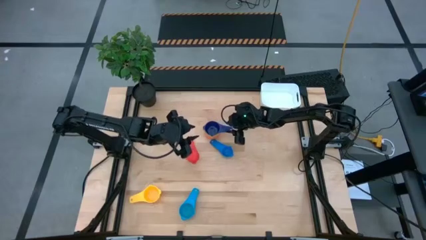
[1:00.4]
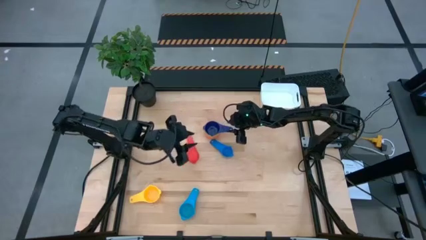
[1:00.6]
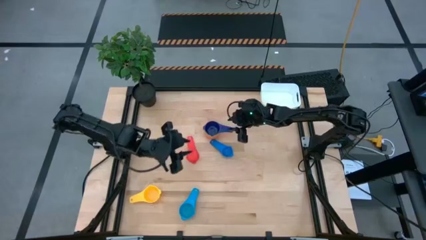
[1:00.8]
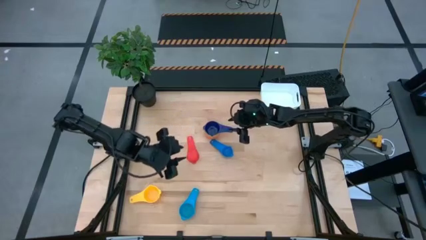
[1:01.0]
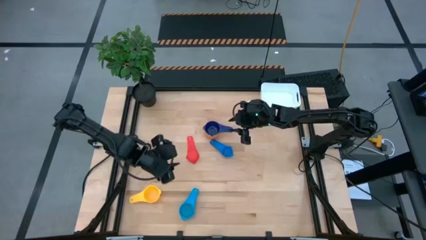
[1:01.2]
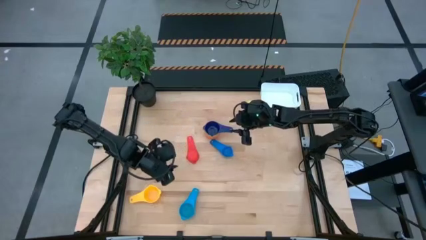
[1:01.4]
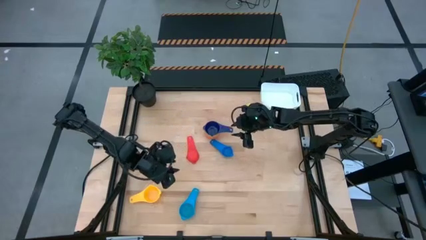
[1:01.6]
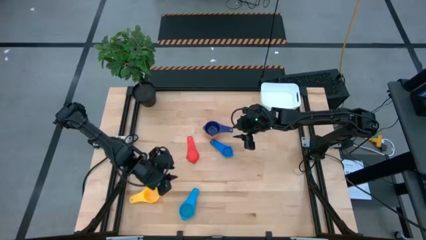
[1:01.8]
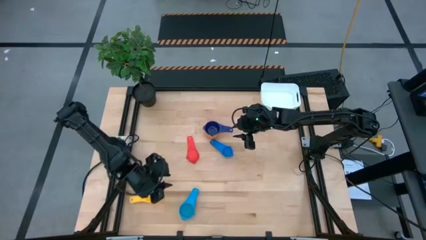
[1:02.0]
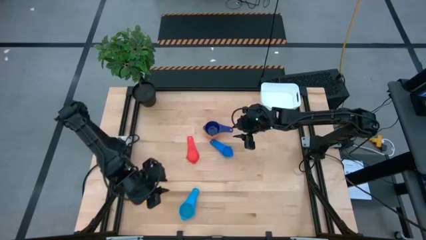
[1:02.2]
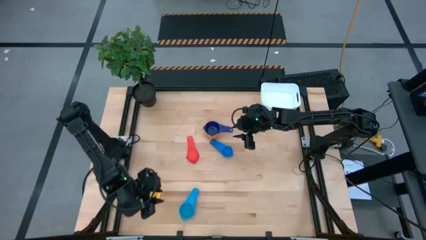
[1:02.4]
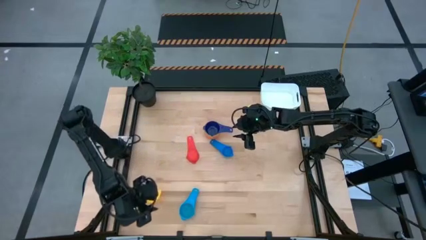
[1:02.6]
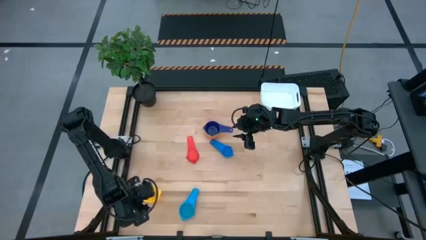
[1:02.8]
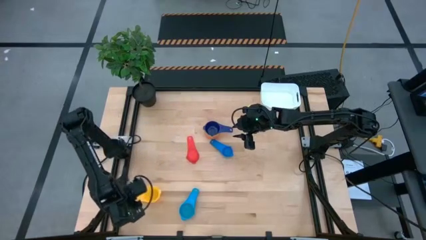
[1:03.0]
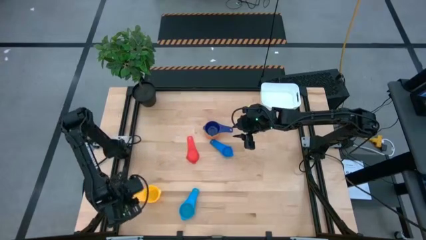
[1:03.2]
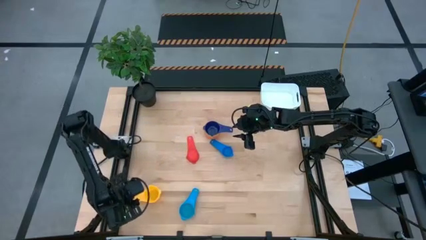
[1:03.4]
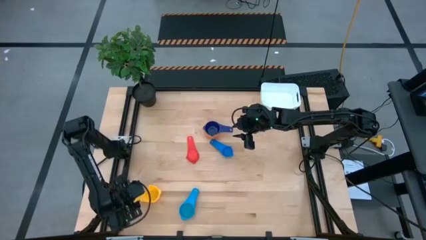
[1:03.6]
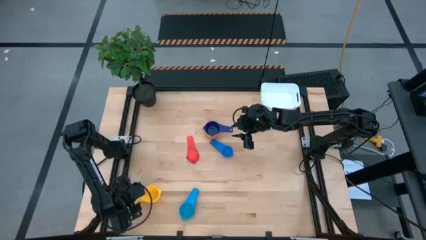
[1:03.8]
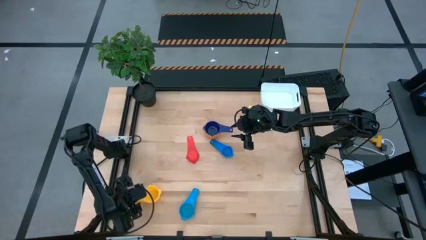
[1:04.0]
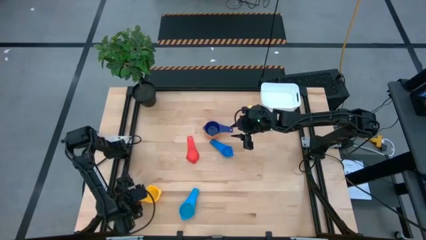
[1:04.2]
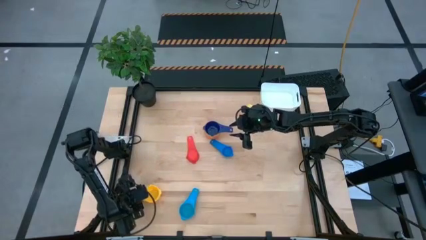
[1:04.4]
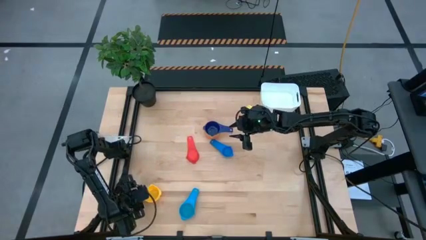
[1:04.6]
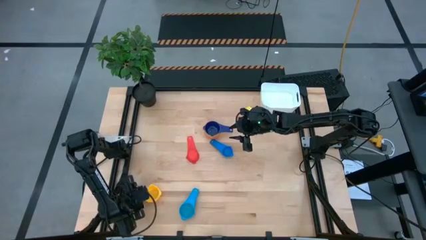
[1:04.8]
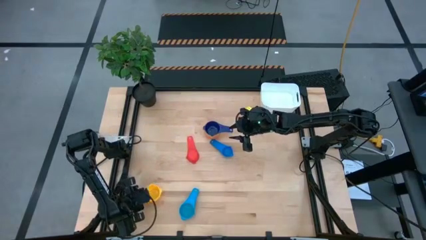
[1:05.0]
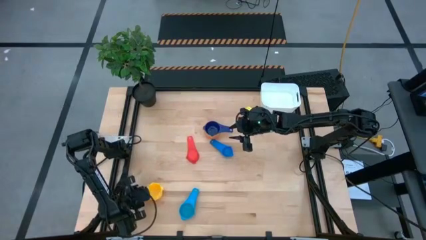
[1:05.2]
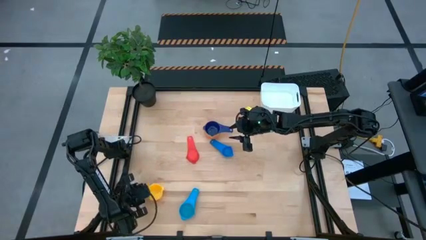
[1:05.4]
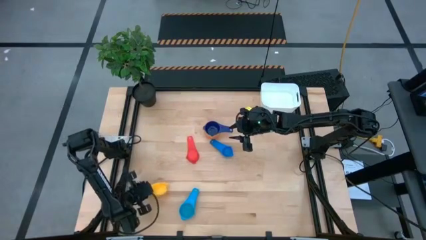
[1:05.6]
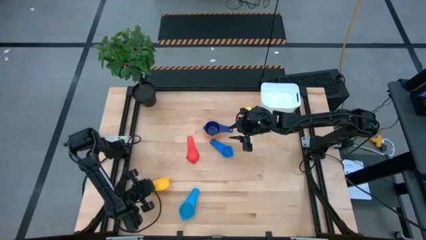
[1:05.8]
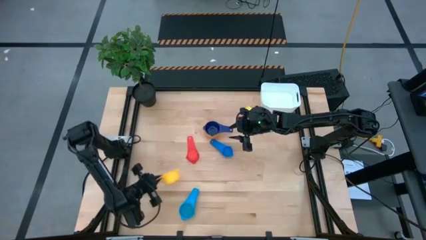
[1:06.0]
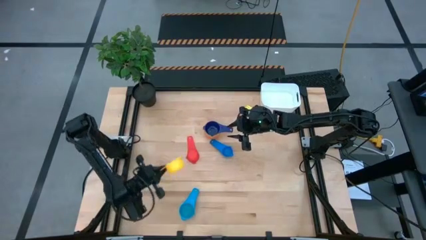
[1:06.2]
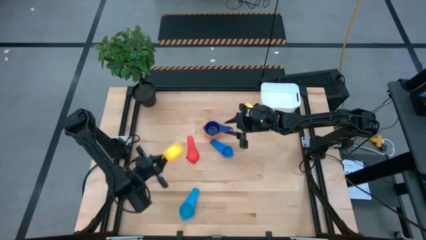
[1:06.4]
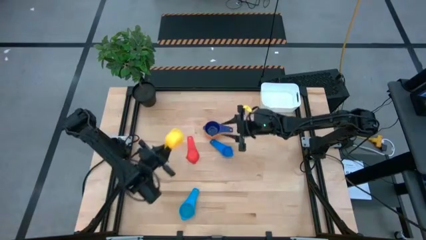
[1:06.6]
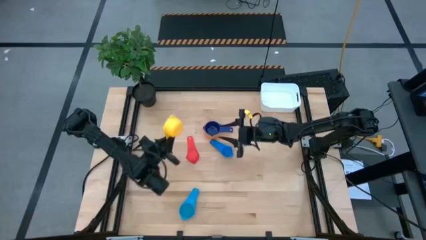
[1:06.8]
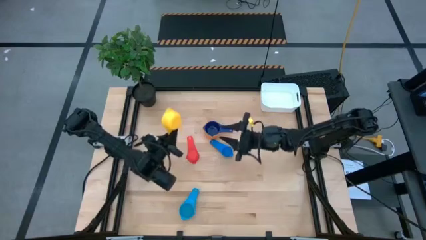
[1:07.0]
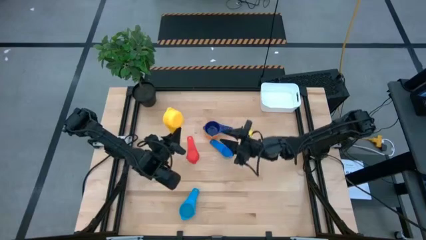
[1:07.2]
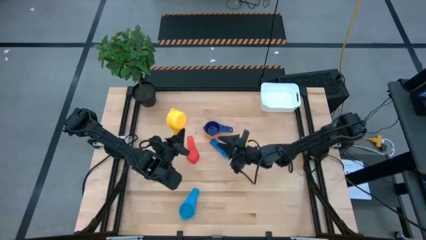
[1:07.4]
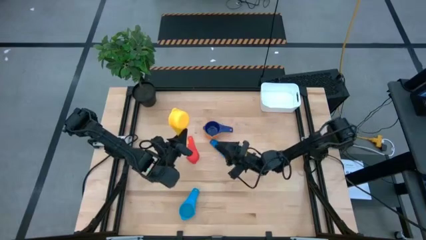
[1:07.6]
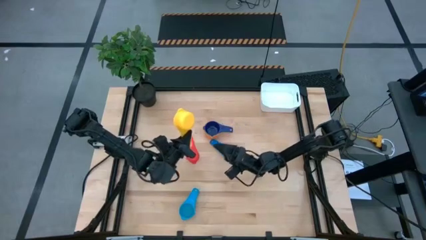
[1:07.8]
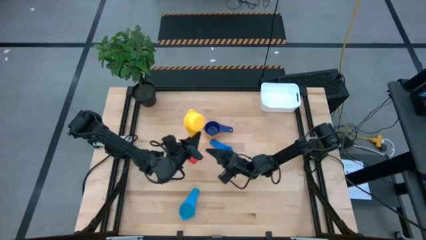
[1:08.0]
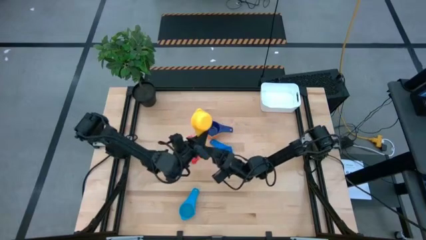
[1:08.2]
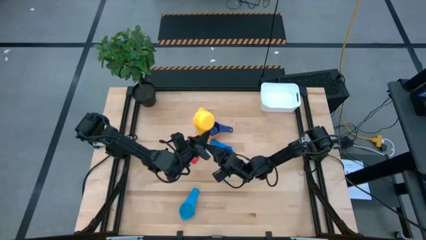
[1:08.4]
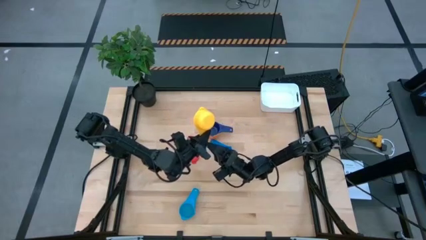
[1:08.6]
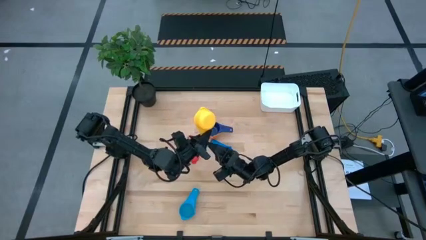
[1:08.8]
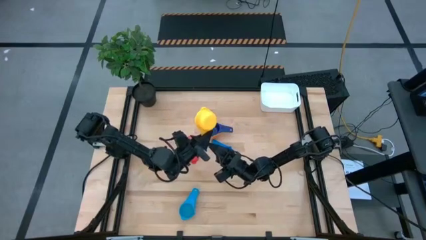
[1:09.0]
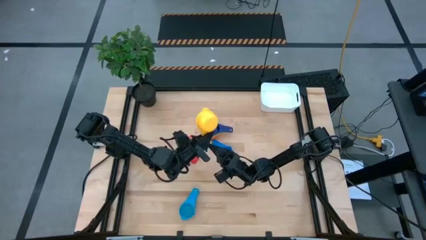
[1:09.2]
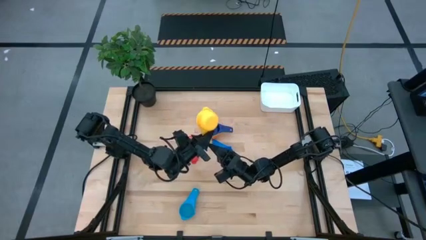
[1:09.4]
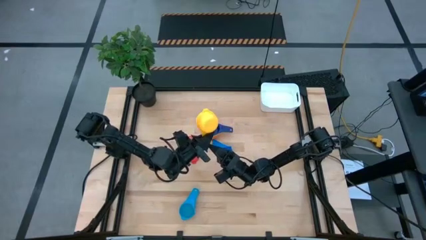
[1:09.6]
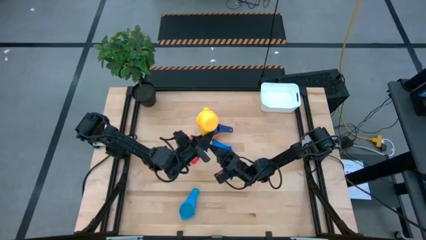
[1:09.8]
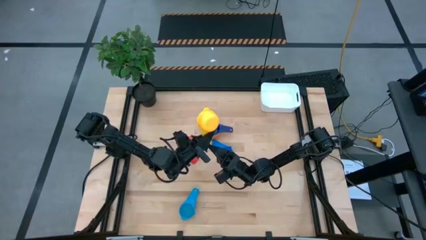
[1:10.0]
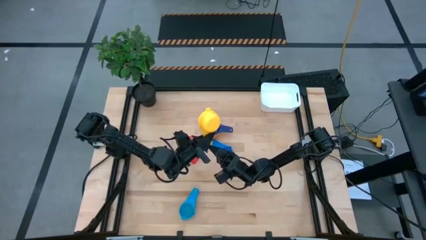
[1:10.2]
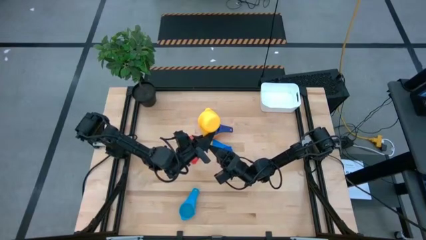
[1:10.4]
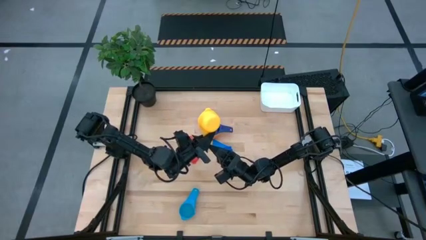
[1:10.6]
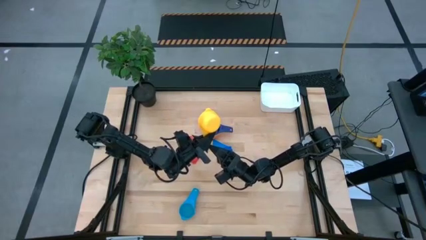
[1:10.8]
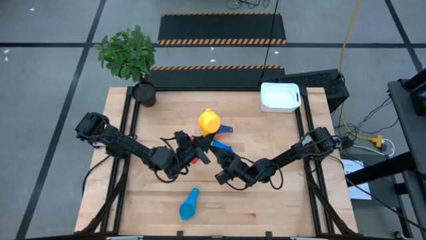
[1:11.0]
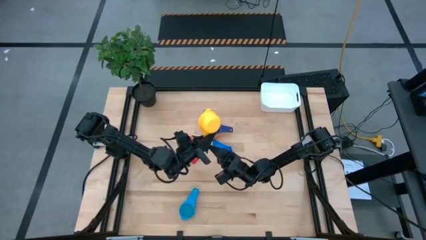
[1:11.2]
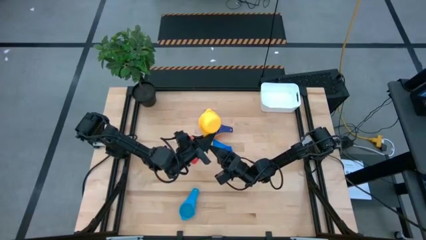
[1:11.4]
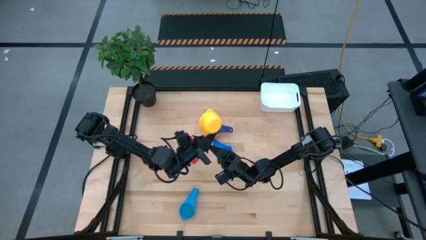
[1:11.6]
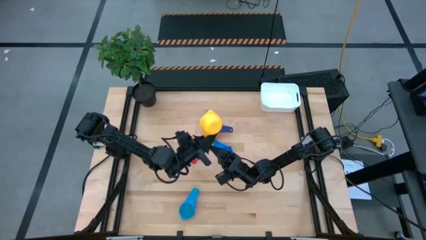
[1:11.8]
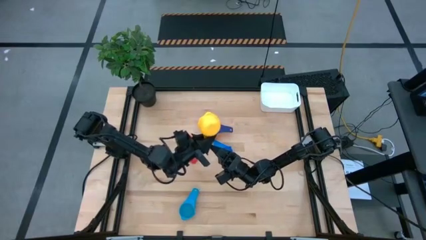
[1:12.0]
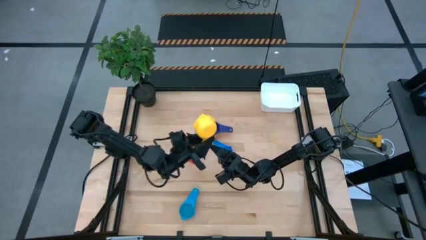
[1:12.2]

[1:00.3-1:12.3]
Task: Nest measuring cups in basket
Stack the yellow measuring cup into the dark blue measuring cup
